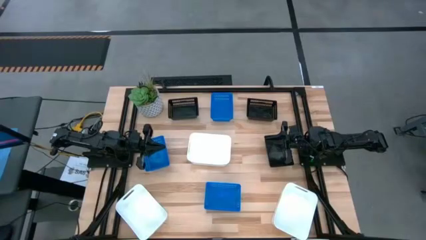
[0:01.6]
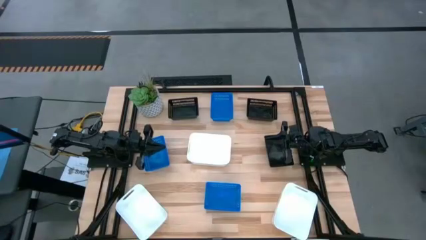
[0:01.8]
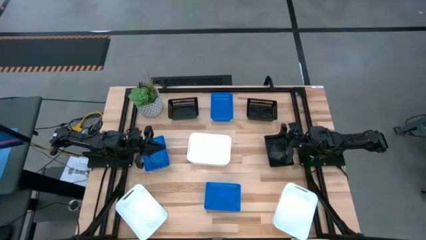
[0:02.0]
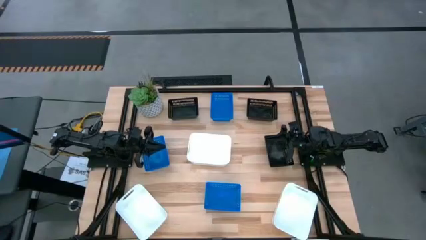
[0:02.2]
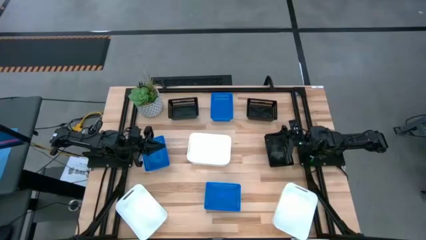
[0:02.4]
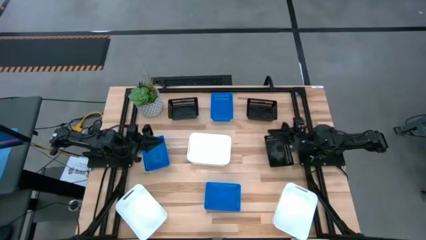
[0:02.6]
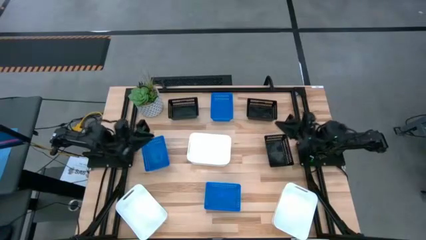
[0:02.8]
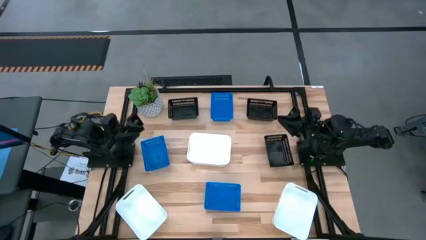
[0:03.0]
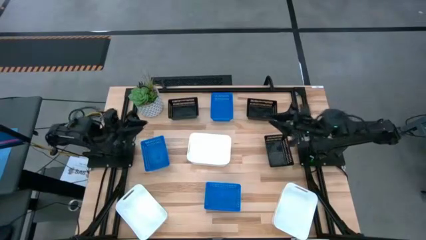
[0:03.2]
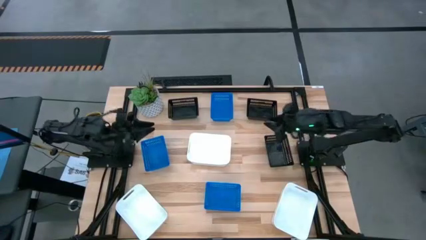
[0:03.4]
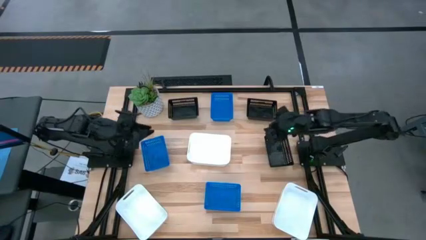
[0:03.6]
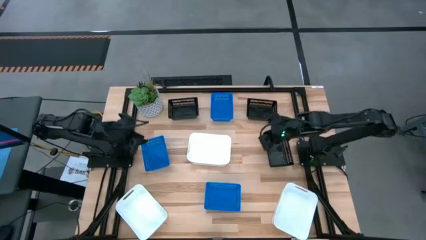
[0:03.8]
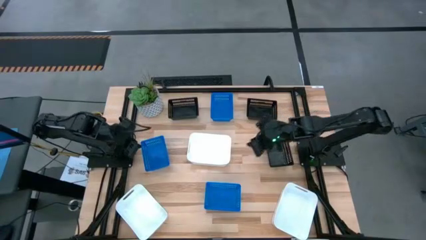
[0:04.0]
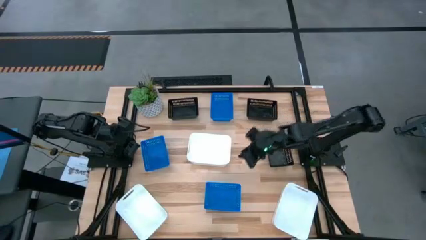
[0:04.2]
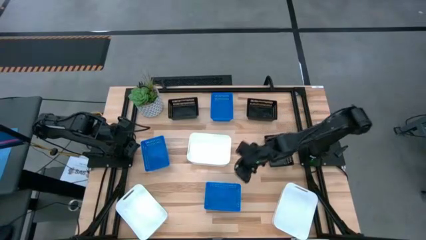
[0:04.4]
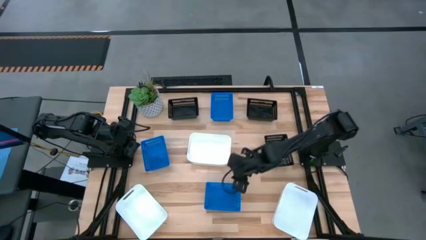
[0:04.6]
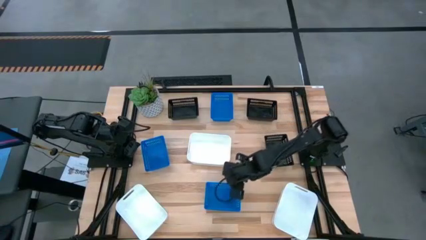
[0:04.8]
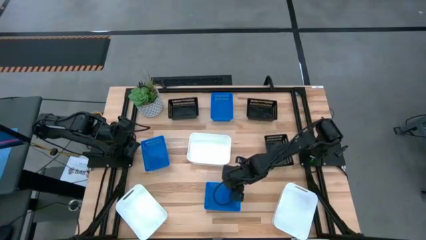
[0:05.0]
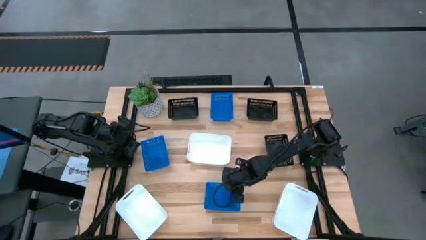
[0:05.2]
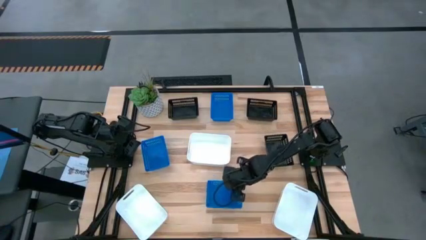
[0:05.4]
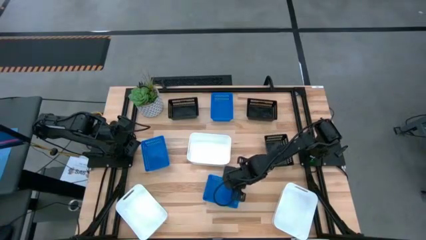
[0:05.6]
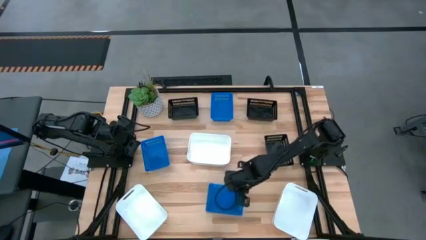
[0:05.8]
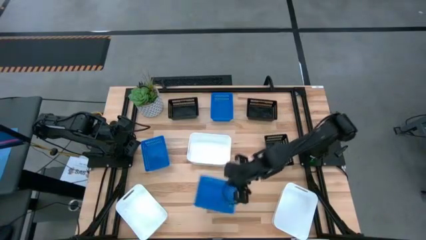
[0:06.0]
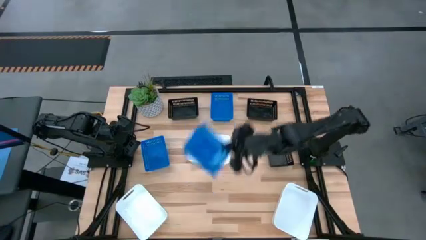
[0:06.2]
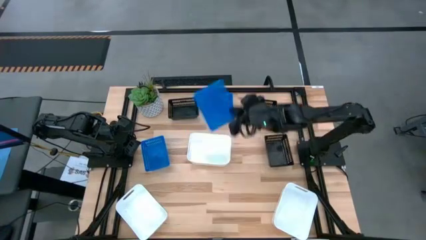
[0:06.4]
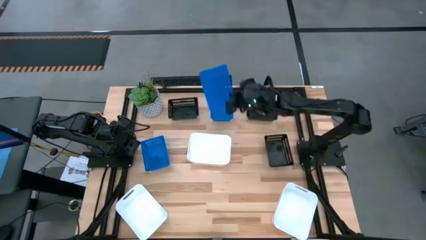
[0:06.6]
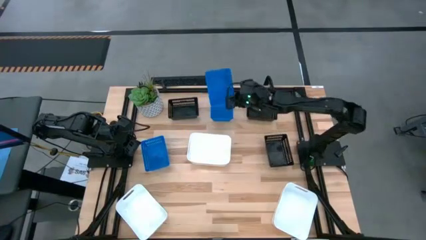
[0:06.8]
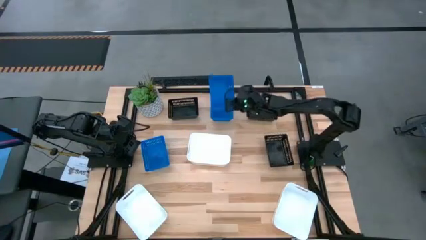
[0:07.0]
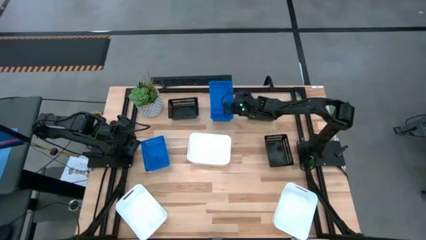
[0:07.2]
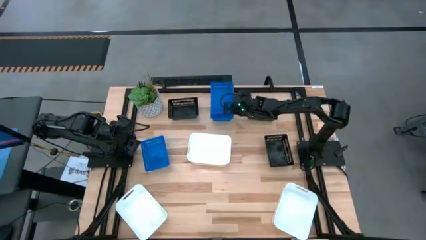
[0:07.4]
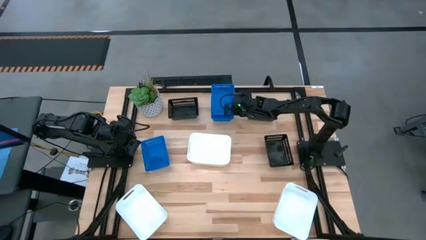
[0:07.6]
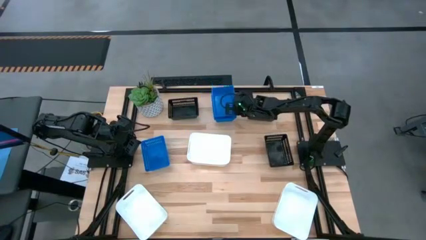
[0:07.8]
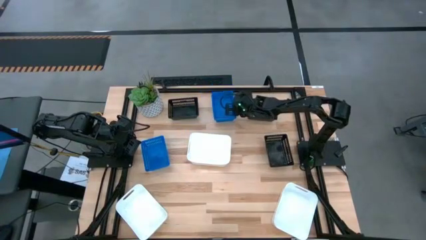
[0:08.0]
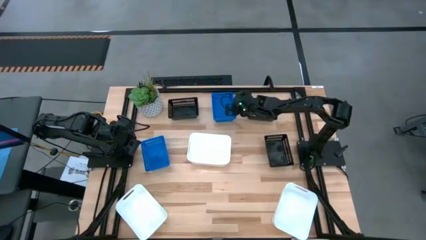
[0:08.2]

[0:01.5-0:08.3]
Stack the bottom blue bin on top of the top blue bin

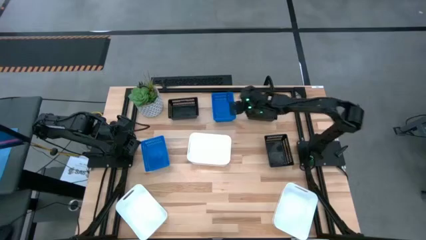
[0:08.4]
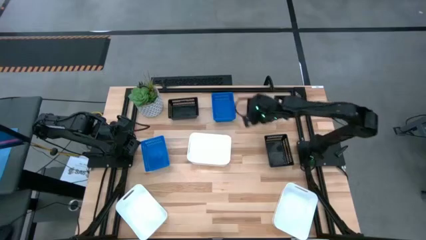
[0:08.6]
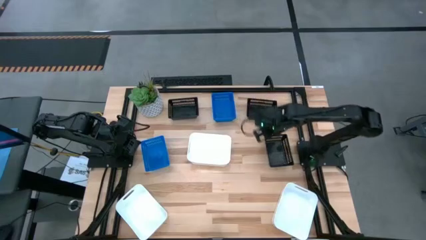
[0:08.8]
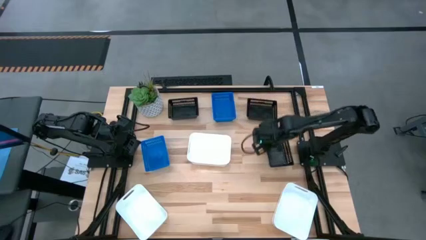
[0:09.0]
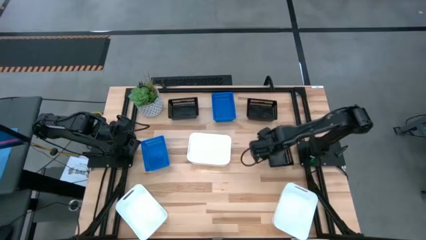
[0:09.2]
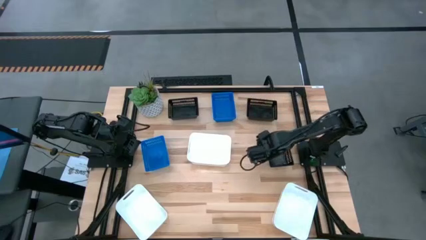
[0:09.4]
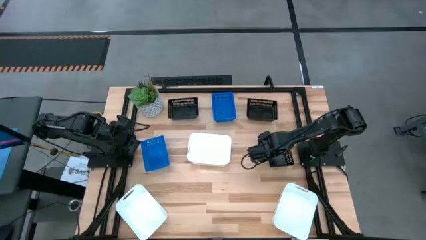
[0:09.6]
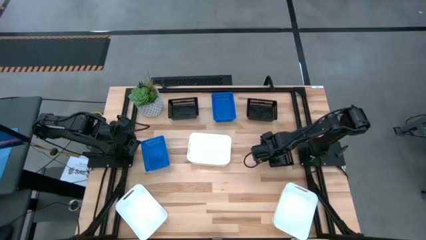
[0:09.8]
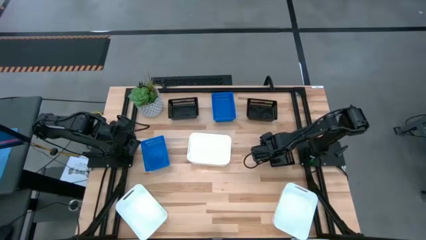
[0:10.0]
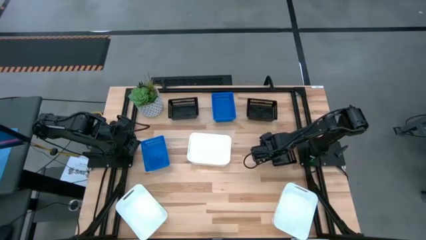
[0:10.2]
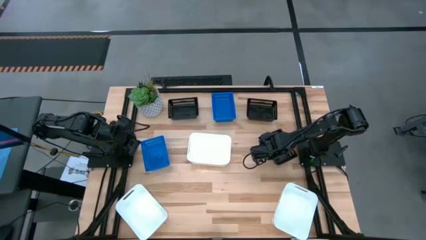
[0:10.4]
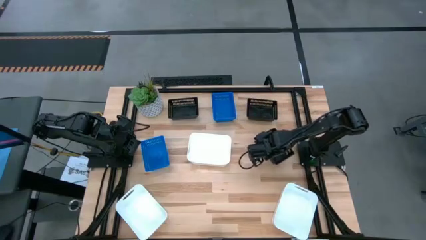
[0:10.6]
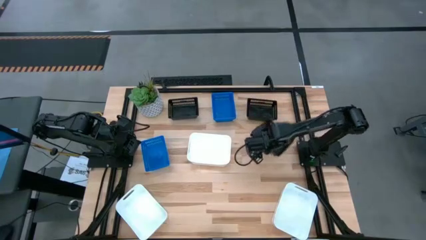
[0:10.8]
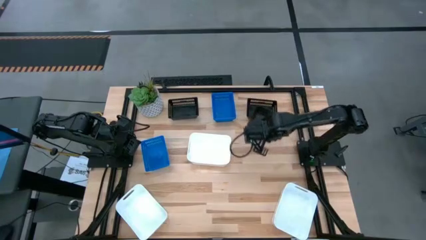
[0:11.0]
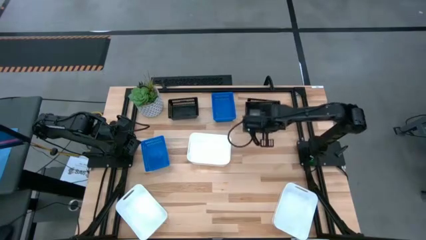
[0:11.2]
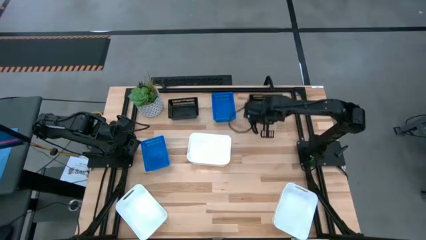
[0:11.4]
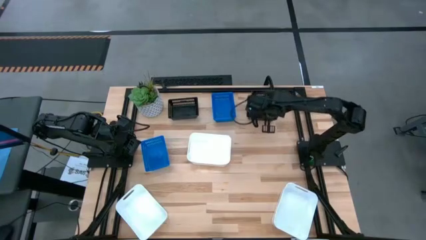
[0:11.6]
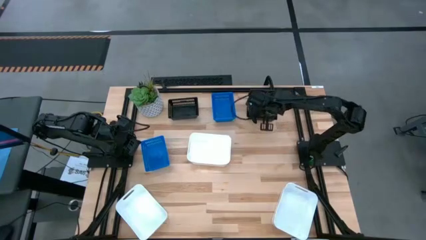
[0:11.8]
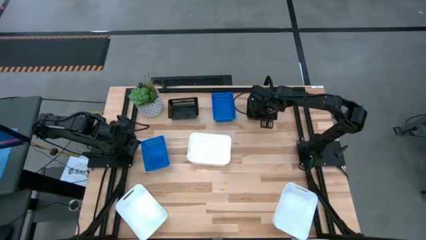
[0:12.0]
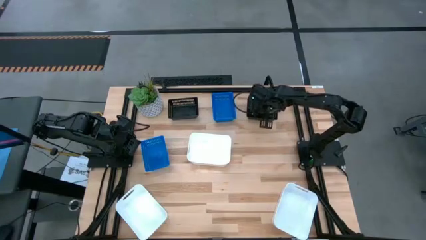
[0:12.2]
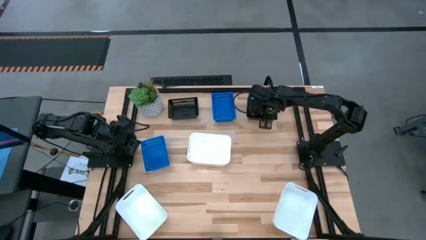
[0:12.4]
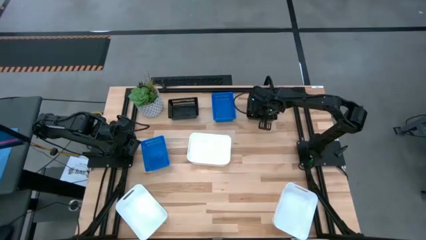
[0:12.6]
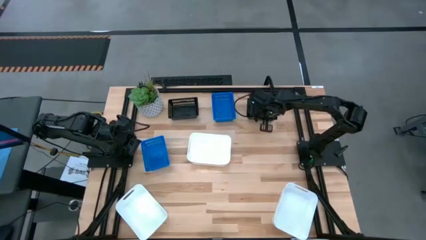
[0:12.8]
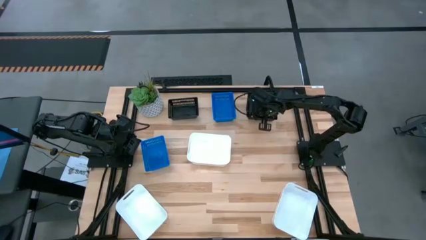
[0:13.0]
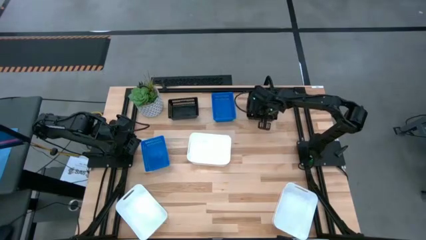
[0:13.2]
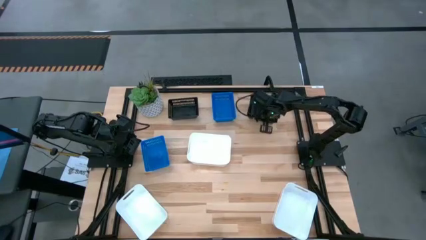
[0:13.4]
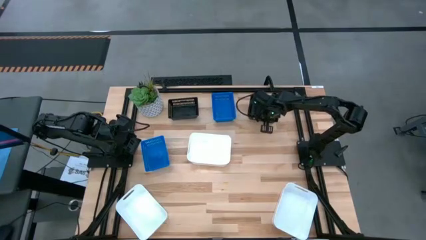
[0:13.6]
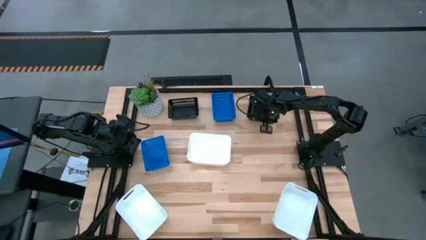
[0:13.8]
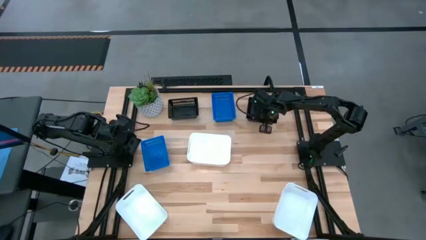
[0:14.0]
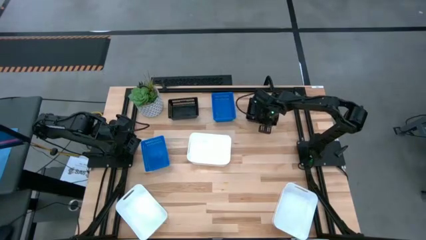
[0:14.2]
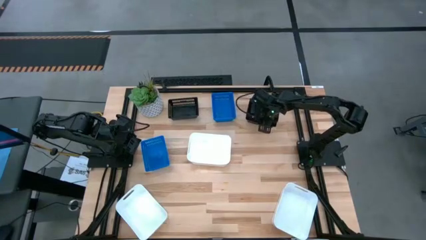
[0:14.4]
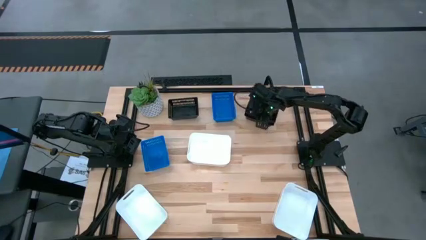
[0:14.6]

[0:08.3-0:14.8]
Stack the bottom right black bin on top of the top right black bin
